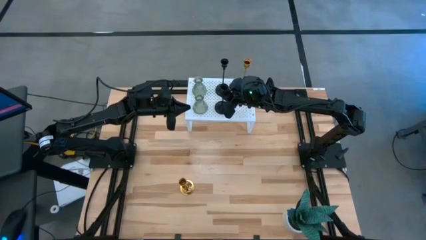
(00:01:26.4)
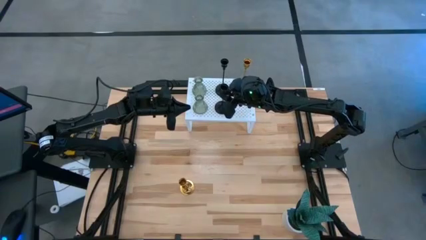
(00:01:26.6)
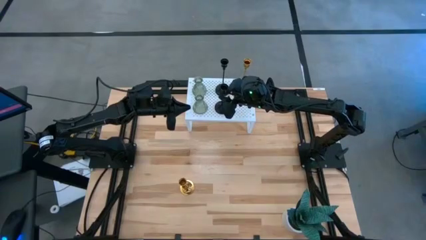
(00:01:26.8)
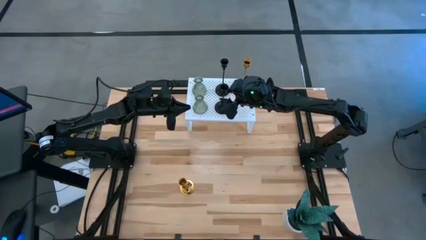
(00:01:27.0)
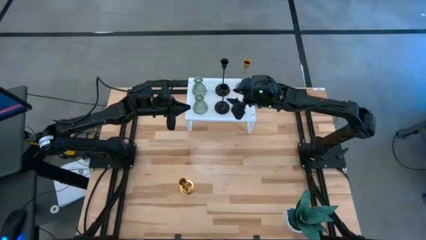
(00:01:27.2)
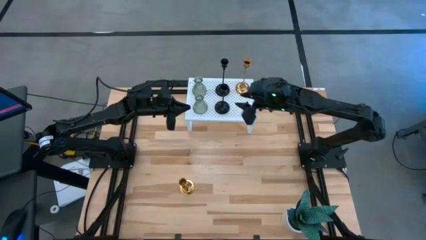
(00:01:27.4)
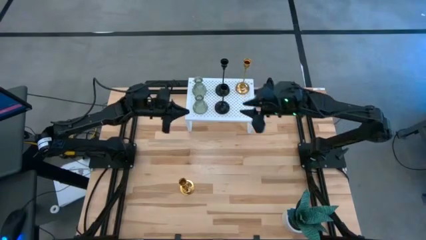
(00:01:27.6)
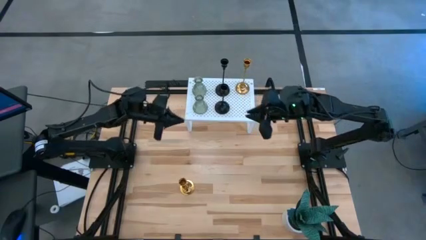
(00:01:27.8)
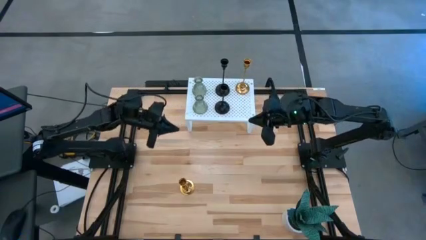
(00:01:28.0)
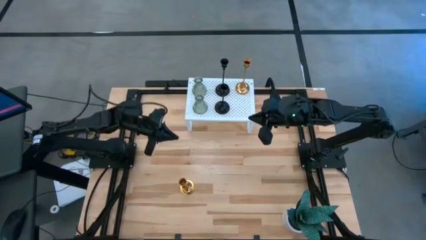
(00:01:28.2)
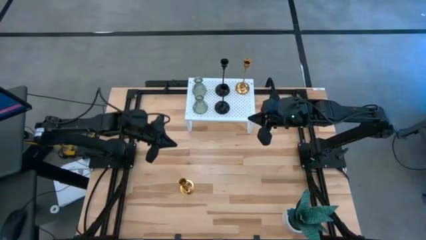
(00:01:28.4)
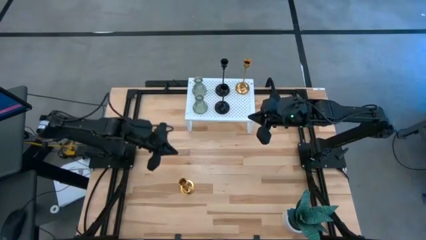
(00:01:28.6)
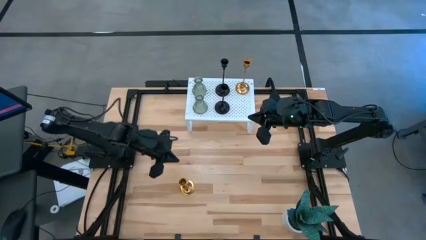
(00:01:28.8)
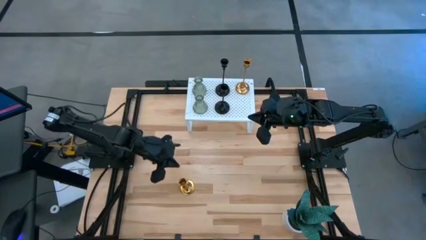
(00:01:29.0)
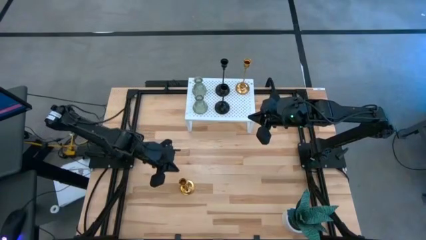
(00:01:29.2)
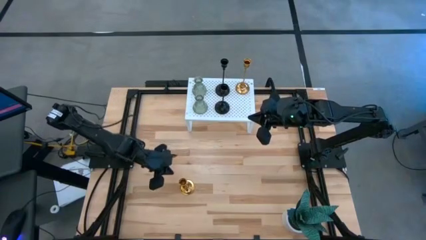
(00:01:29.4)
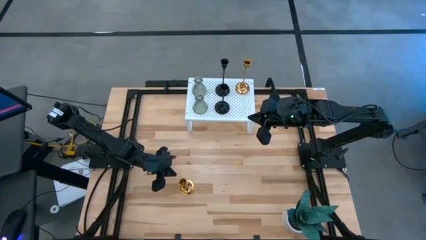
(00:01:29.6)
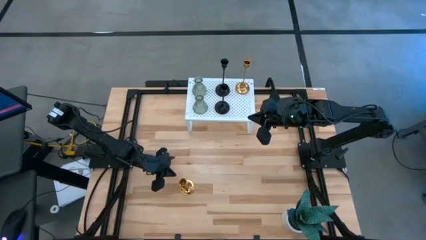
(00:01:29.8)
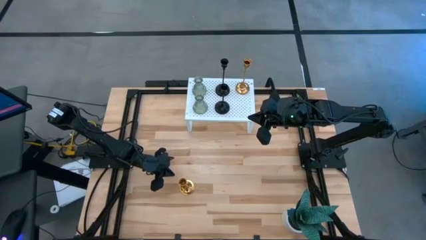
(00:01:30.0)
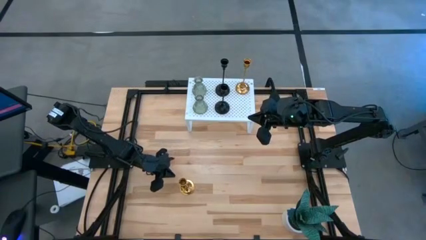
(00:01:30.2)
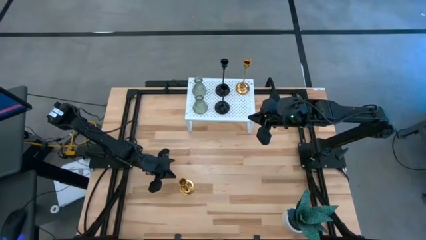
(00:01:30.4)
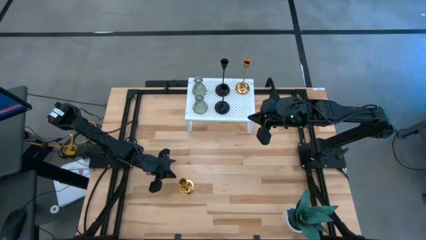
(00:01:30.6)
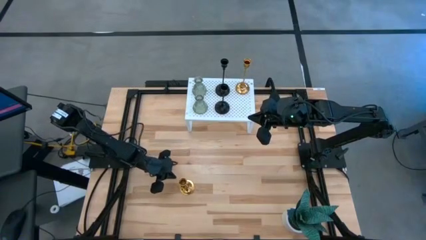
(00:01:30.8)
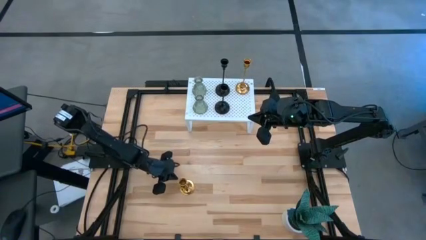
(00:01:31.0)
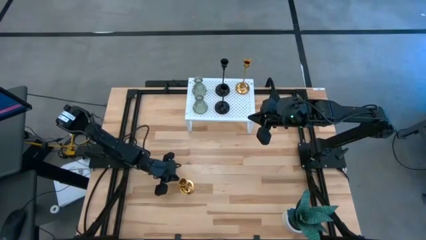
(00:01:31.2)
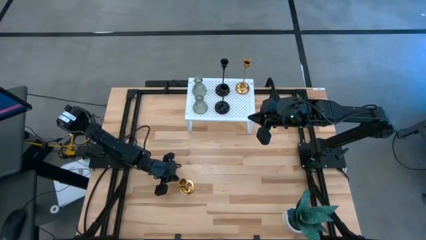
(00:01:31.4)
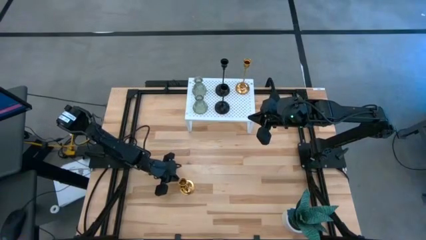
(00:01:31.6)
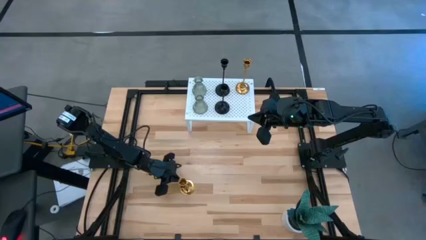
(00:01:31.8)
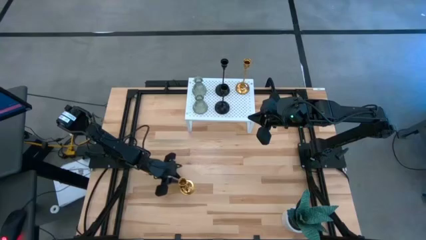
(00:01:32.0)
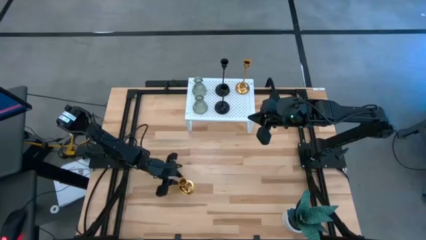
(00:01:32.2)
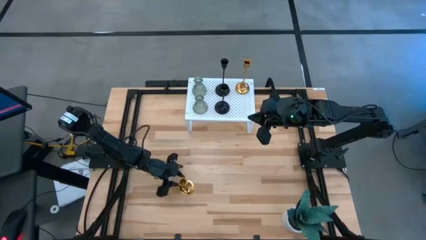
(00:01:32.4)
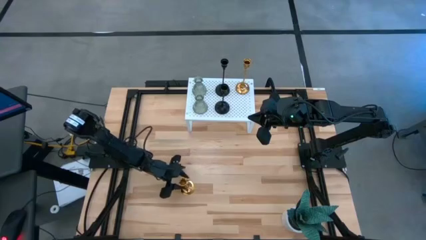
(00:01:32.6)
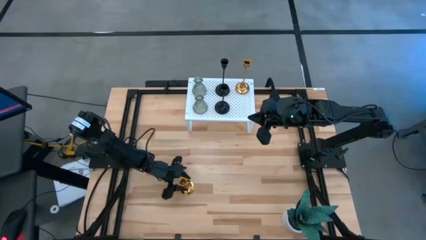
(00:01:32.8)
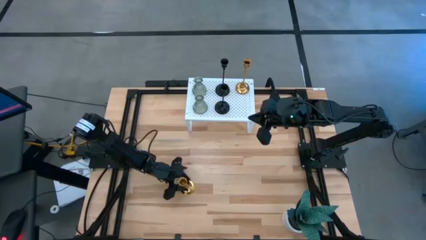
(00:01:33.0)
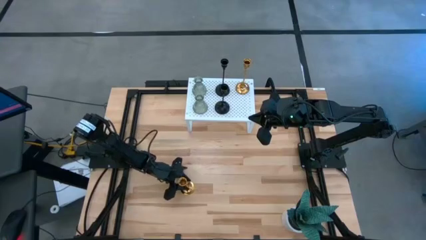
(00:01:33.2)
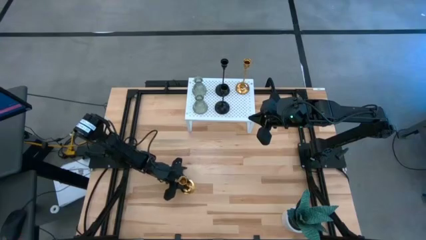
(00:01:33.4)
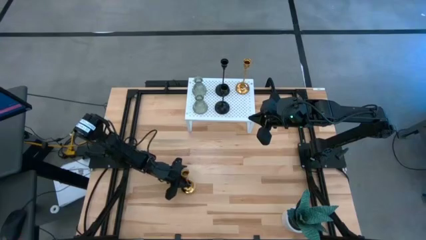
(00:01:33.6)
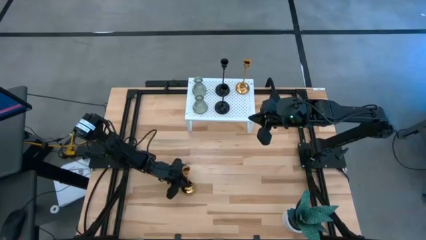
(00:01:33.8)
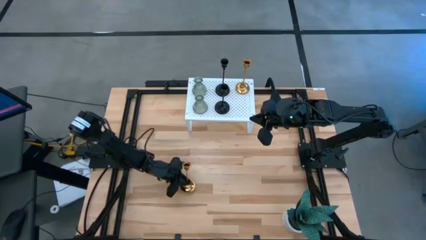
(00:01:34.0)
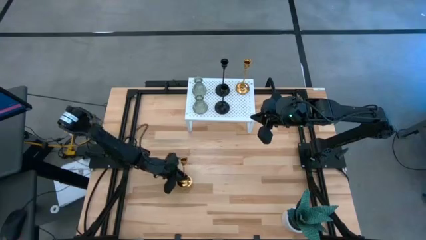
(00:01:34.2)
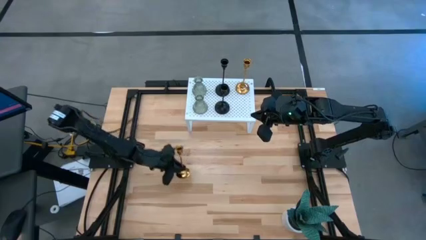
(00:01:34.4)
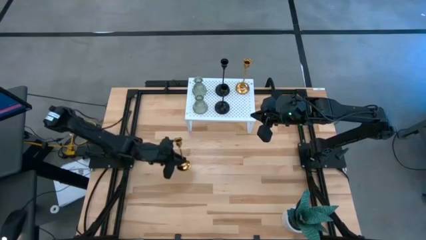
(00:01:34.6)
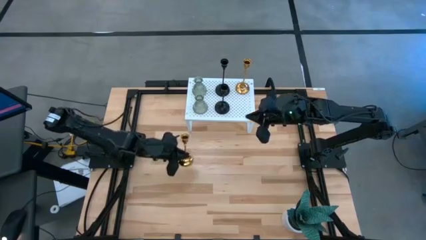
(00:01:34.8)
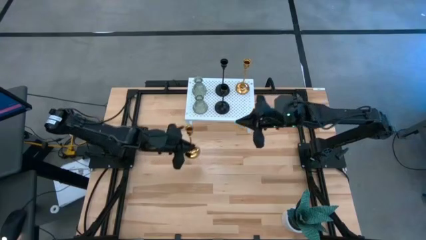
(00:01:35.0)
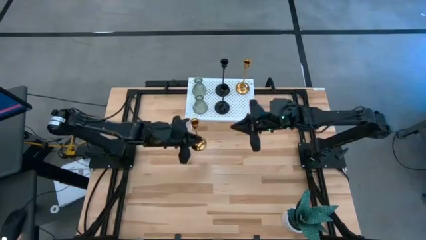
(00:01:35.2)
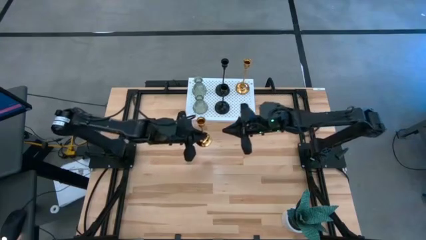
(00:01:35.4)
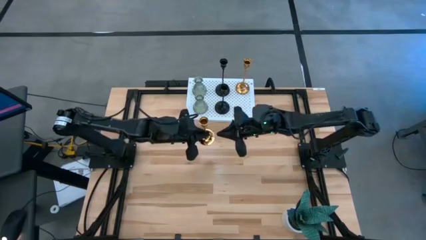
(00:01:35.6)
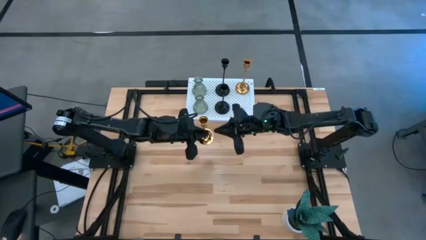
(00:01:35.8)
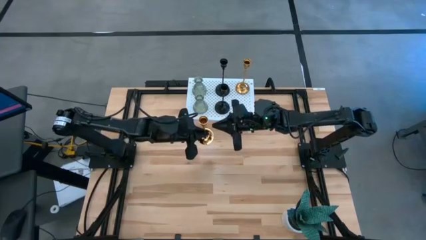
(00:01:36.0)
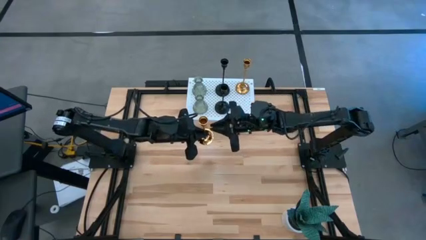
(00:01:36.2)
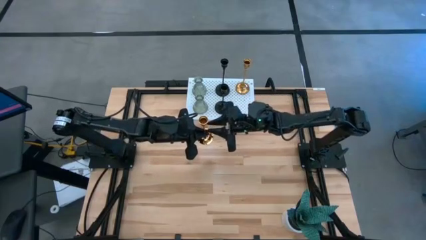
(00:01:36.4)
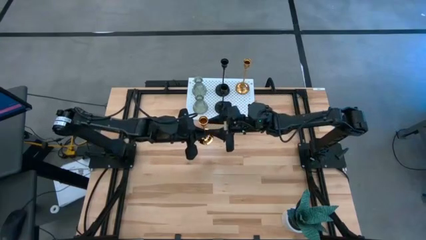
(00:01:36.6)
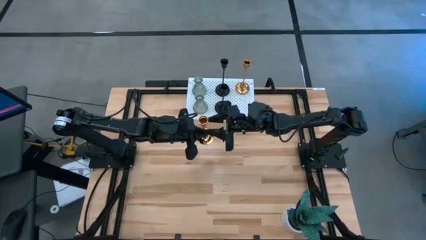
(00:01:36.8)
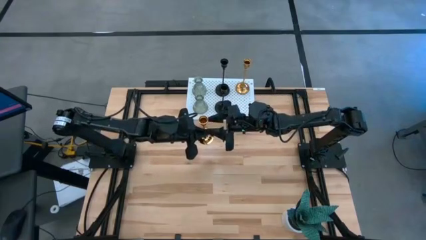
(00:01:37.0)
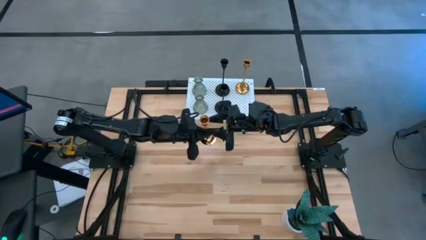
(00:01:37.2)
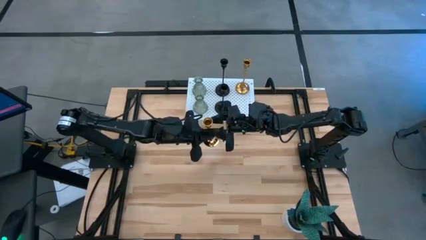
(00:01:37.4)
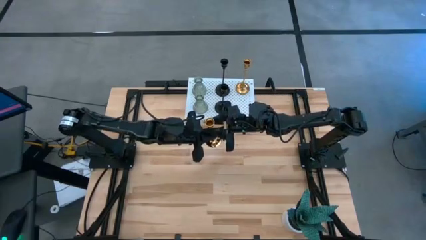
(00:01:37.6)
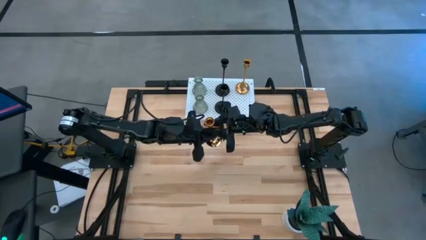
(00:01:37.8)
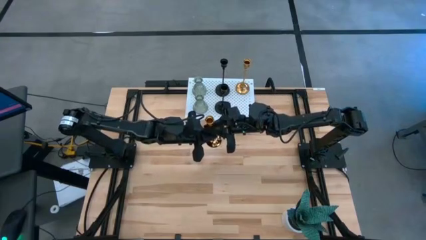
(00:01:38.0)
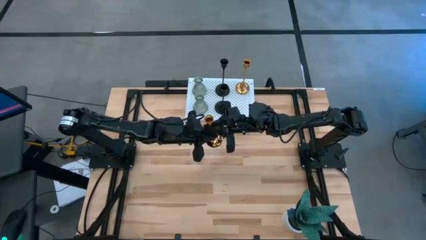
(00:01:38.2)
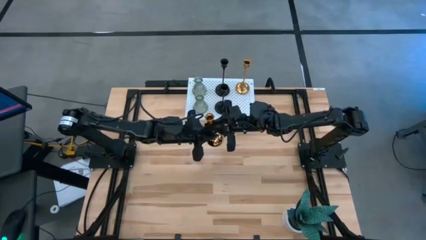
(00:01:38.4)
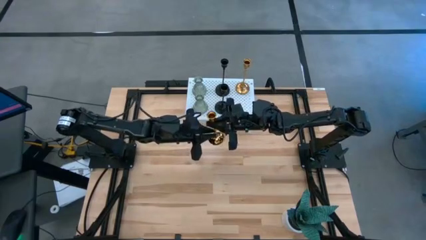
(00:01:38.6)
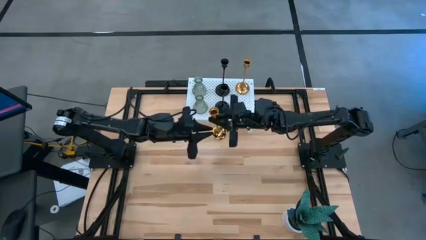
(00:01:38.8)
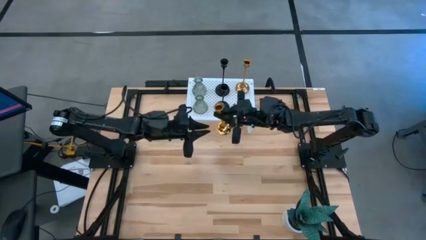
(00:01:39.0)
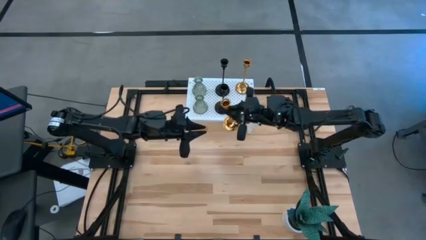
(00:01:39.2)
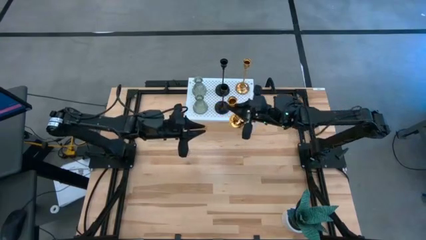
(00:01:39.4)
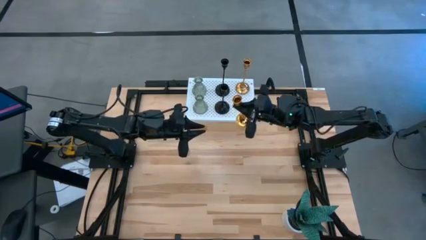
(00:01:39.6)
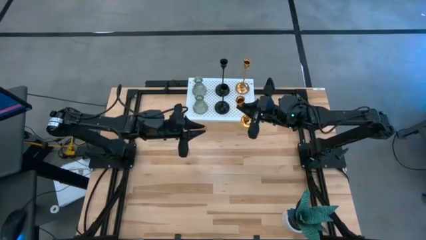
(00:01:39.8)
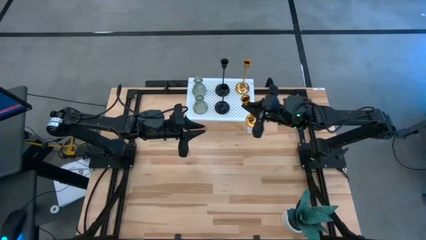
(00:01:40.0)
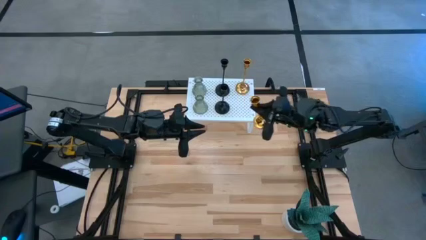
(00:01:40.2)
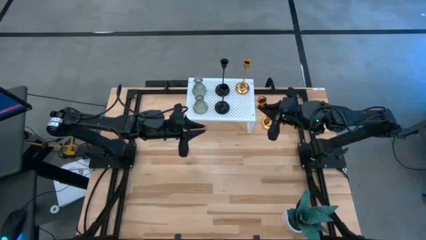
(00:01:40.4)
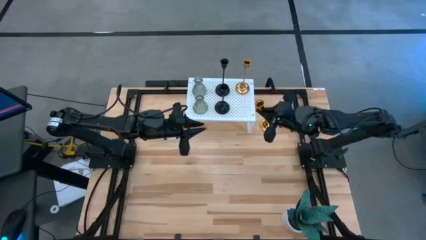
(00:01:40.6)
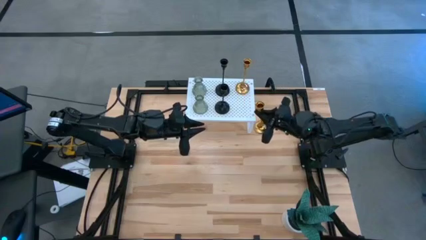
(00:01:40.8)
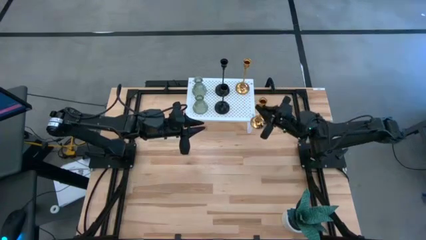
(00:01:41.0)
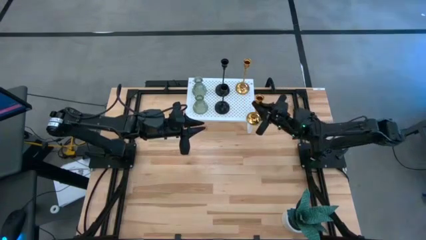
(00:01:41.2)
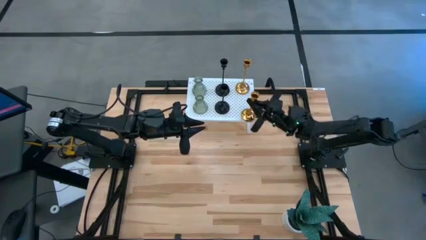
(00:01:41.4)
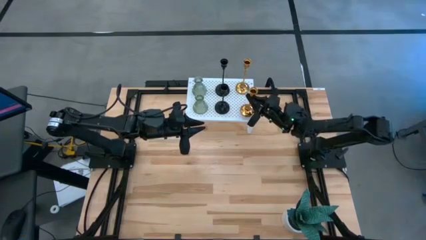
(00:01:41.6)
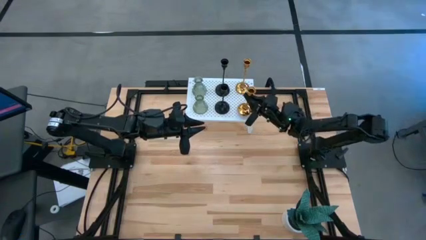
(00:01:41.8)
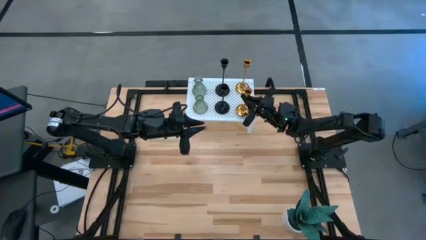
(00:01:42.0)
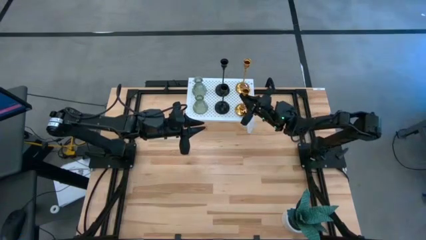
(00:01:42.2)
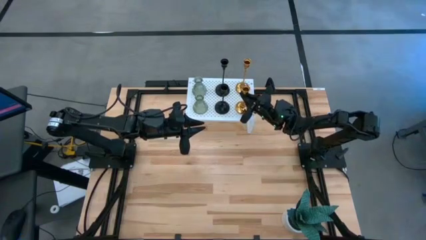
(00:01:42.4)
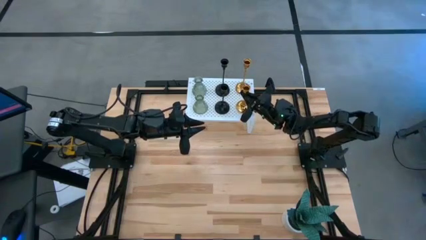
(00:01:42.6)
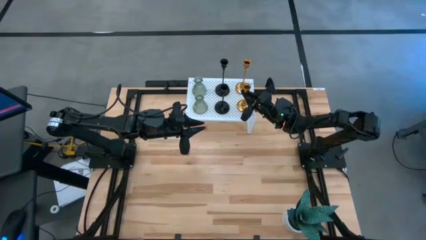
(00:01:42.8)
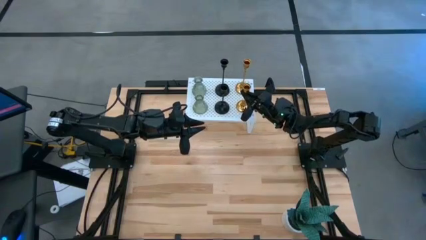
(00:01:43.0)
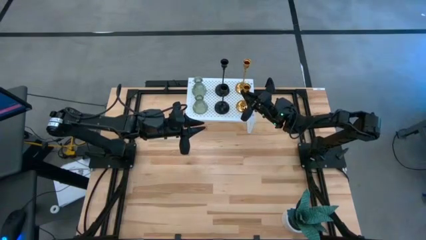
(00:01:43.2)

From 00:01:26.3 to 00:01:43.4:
Task: Pick & Place candle stick holders
Align the golden candle holder with the golden candle holder on the shelf
